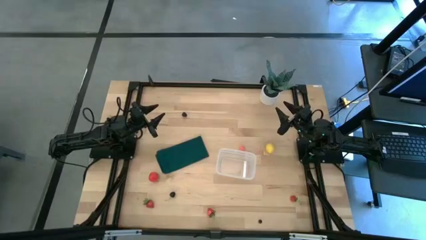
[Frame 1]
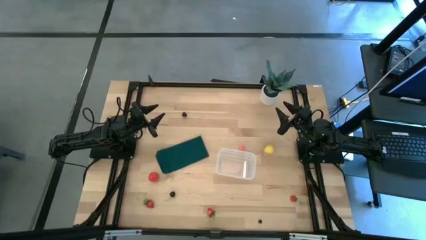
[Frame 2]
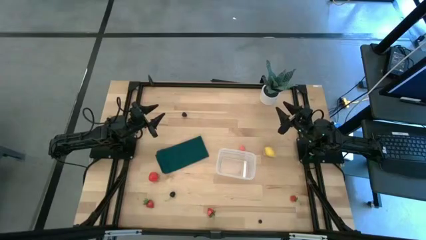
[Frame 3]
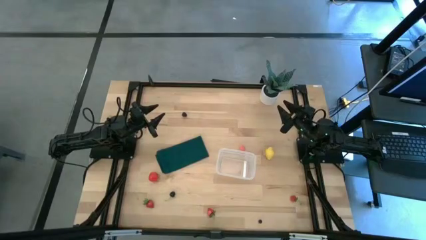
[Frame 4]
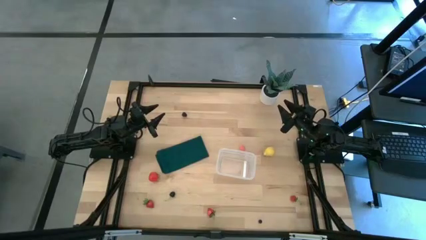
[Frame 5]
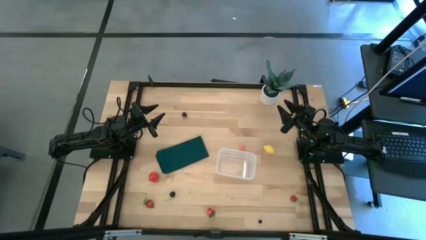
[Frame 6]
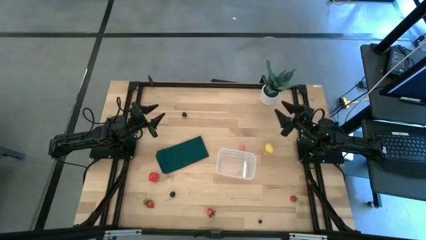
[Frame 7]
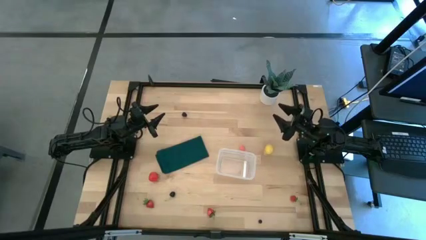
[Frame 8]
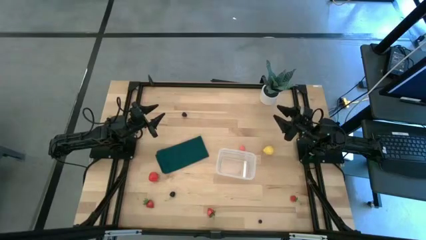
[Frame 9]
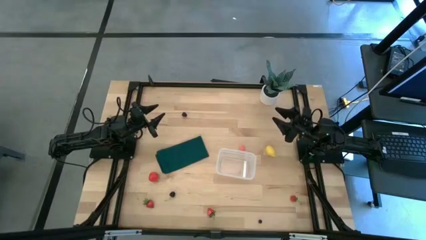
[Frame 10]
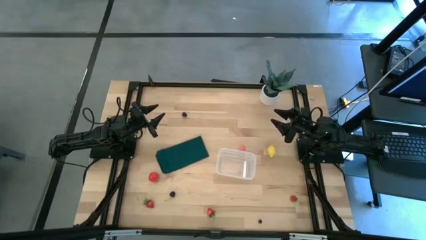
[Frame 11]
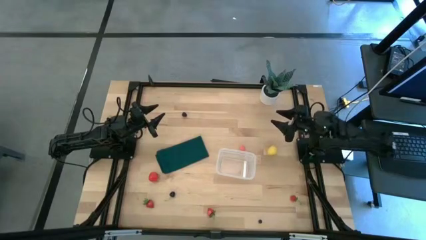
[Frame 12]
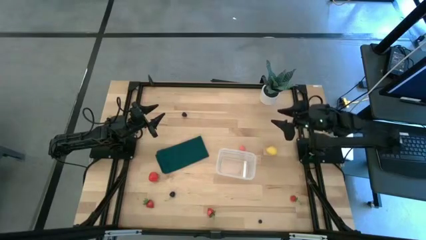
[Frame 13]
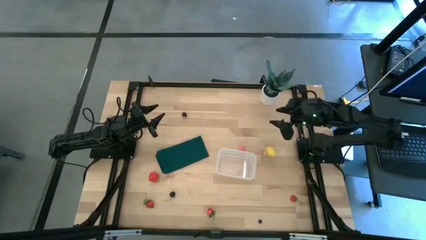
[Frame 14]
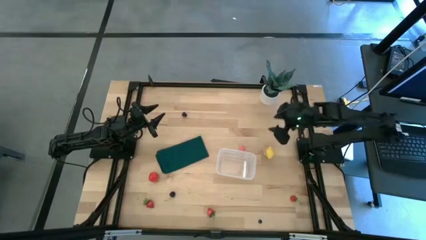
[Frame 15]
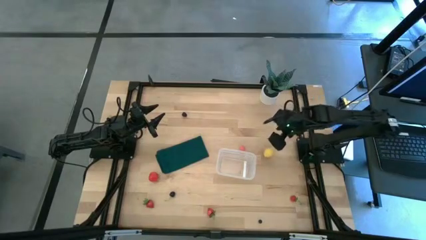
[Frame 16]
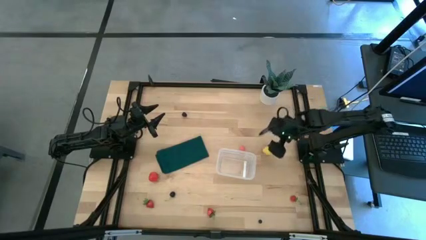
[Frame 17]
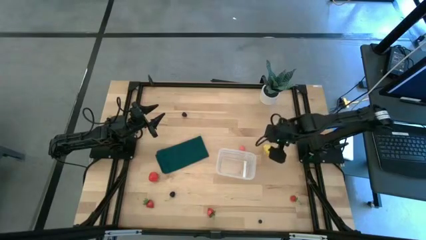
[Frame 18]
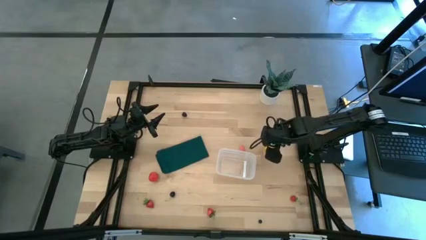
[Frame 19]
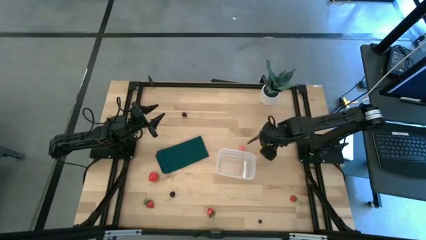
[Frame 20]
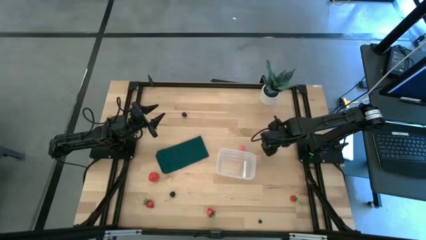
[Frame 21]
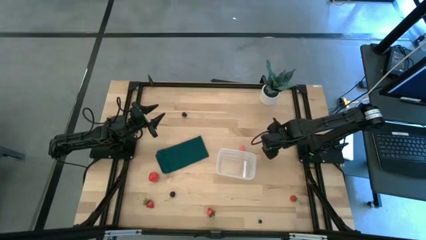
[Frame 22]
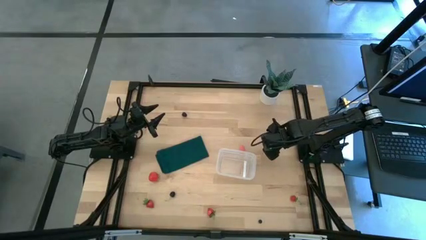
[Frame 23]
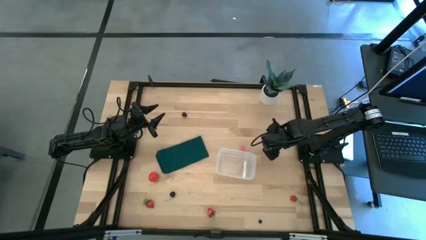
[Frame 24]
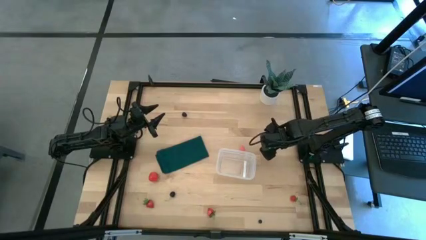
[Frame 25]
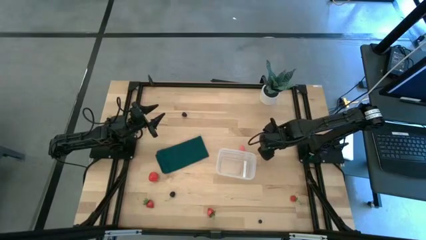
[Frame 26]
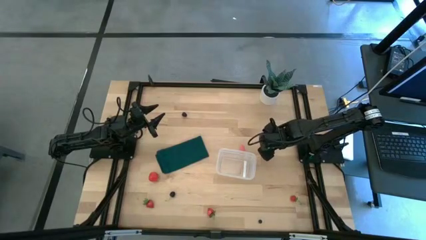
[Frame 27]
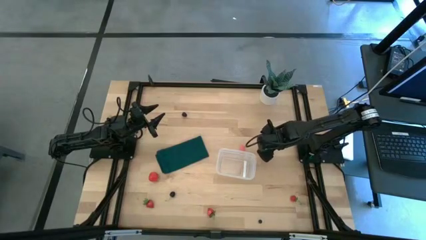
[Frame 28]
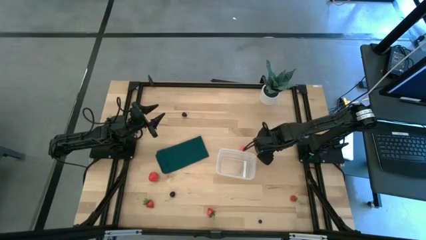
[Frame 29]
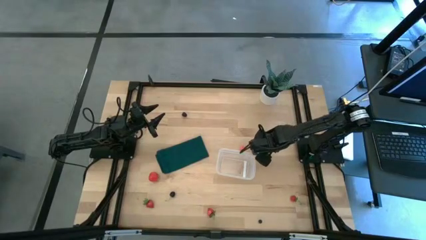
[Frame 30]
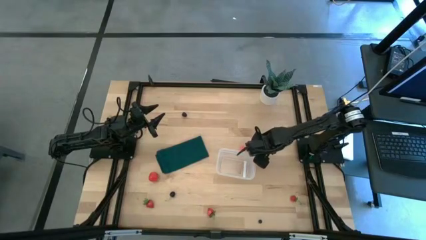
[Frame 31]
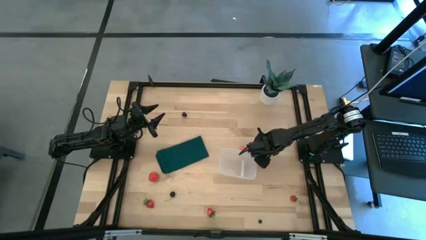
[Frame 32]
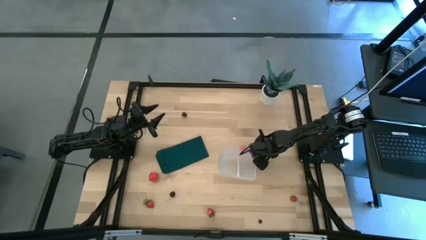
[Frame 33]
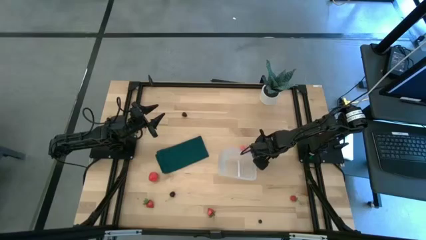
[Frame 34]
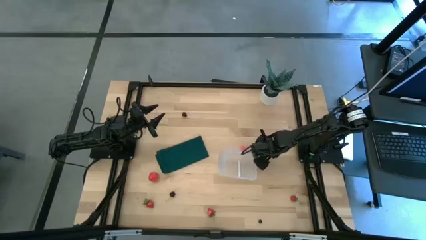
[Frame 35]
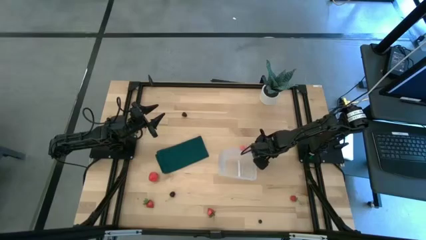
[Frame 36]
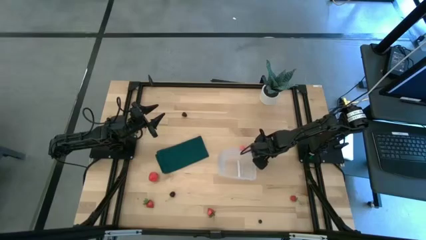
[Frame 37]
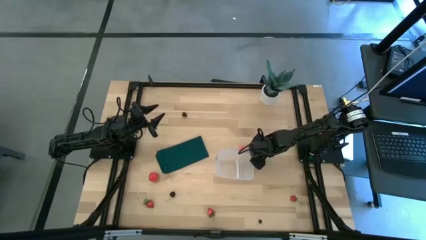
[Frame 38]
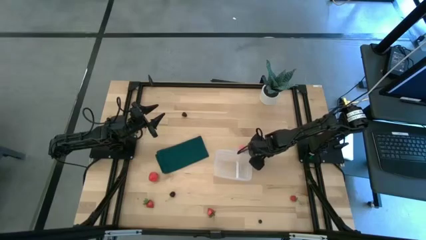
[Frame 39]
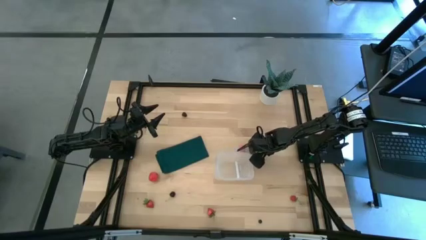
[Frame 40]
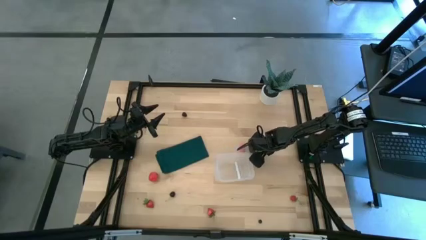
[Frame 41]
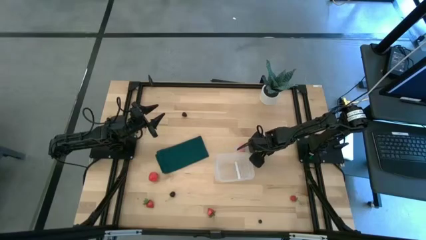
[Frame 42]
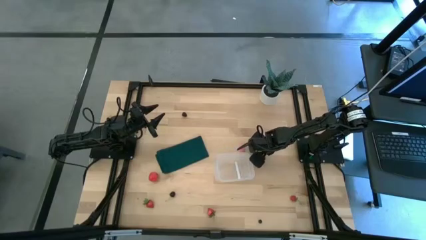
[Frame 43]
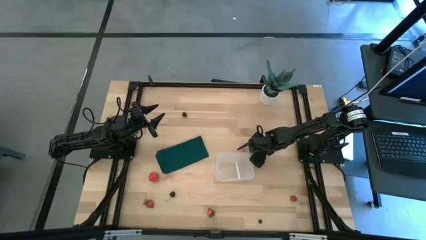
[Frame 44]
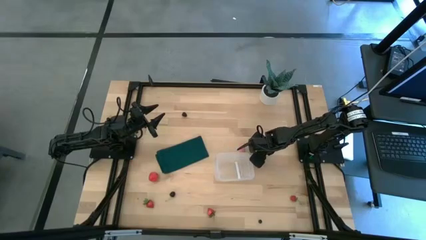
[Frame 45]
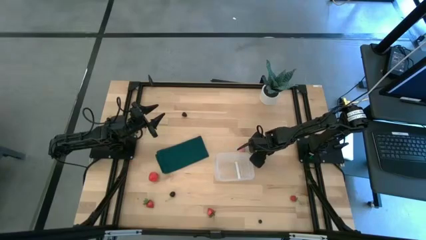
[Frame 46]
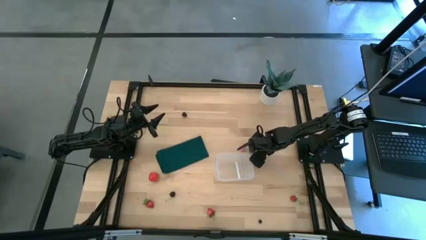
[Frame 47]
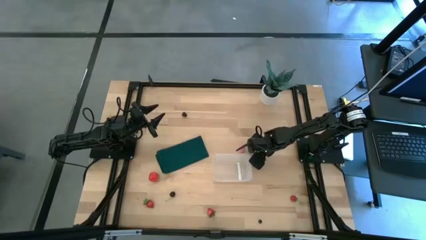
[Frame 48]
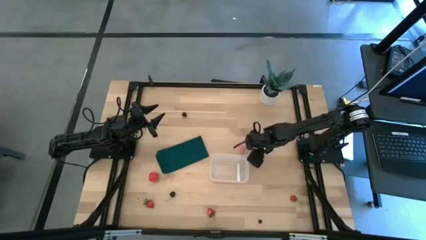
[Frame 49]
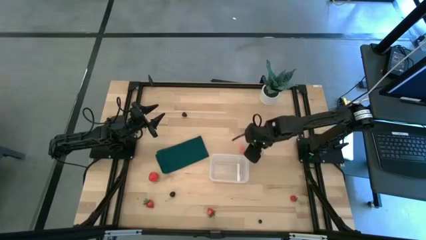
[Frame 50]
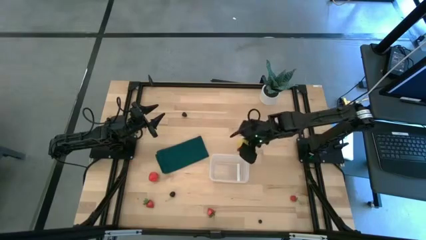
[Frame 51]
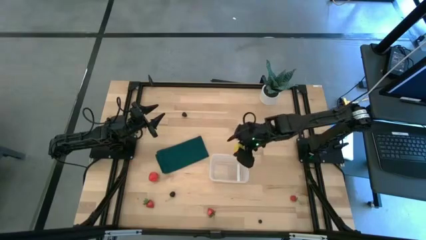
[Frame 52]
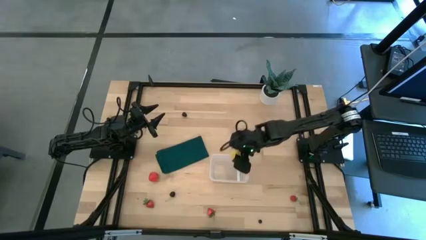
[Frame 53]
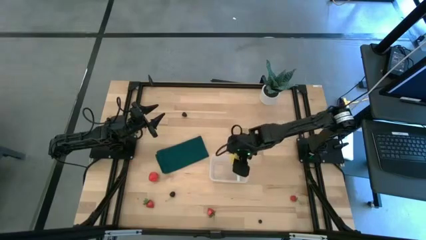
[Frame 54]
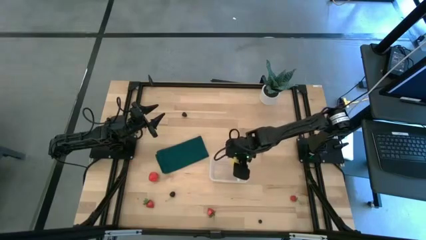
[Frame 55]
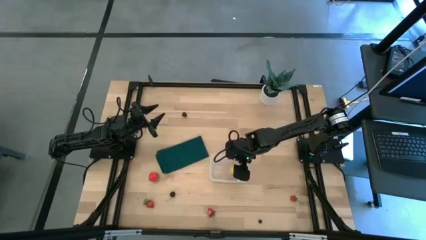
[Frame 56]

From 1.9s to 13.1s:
Task: Pick and placing Produce into tupperware
Put the lemon into the transparent bin

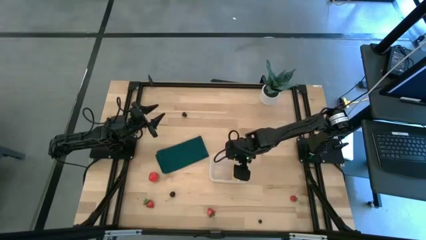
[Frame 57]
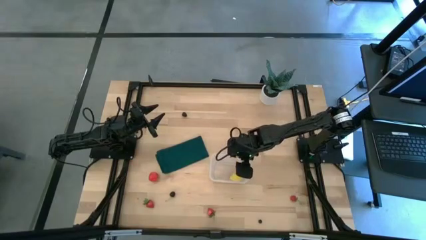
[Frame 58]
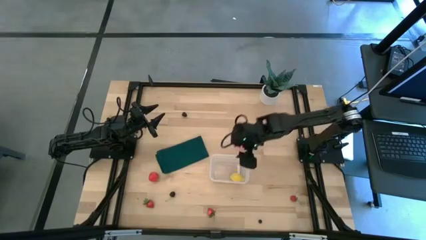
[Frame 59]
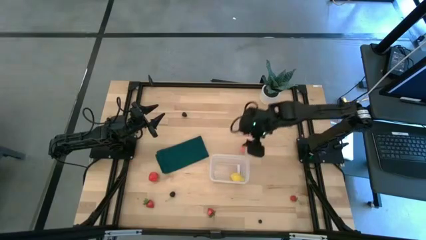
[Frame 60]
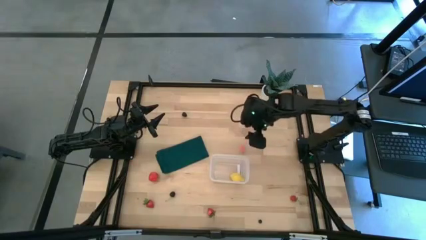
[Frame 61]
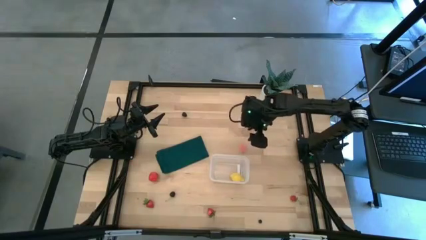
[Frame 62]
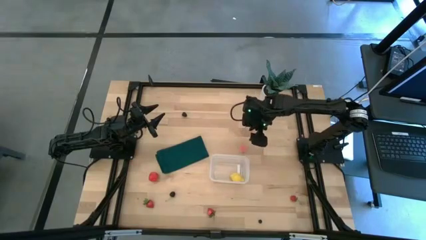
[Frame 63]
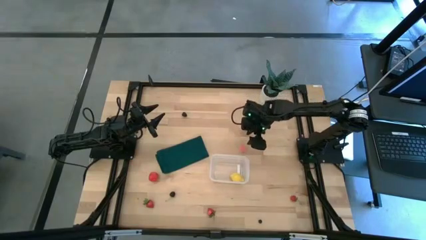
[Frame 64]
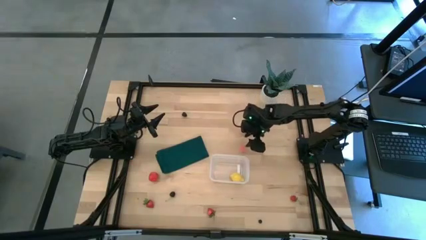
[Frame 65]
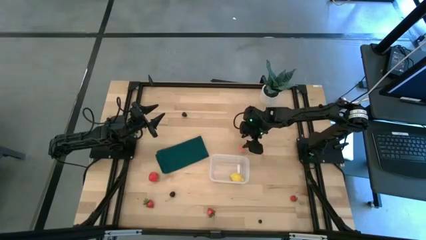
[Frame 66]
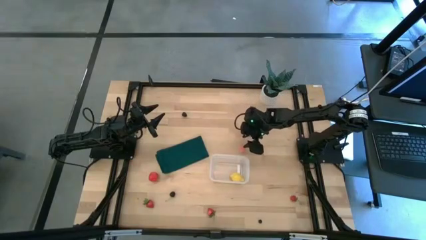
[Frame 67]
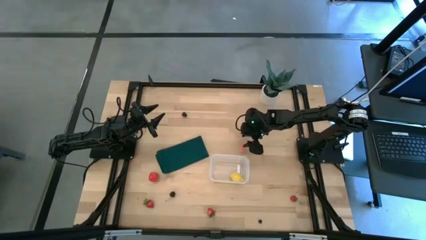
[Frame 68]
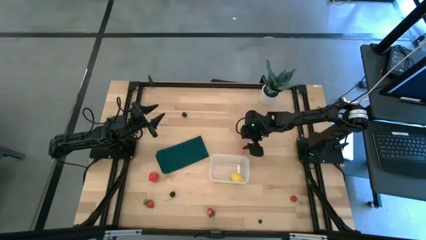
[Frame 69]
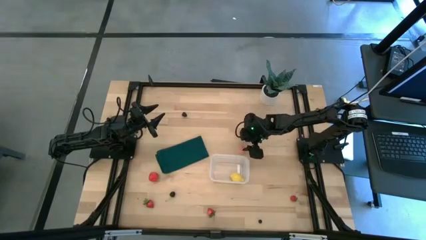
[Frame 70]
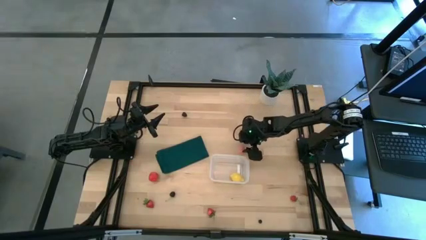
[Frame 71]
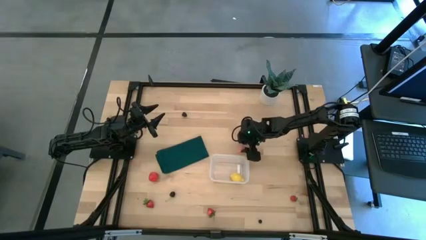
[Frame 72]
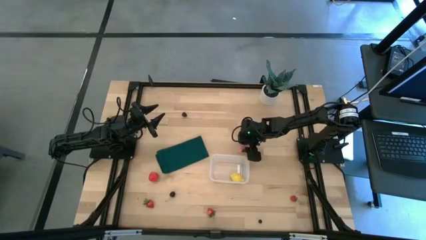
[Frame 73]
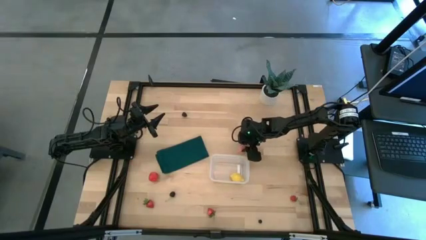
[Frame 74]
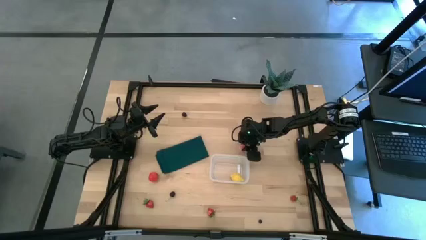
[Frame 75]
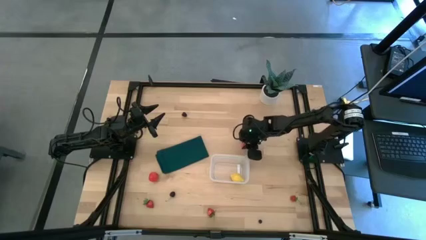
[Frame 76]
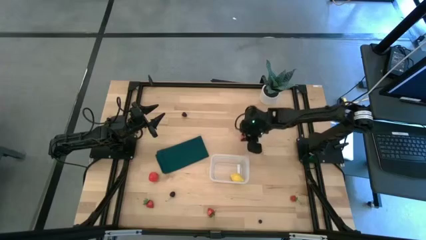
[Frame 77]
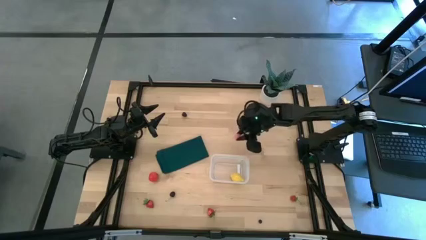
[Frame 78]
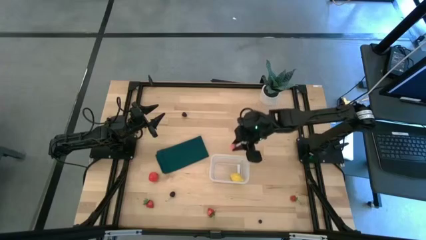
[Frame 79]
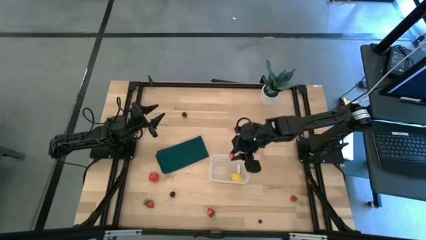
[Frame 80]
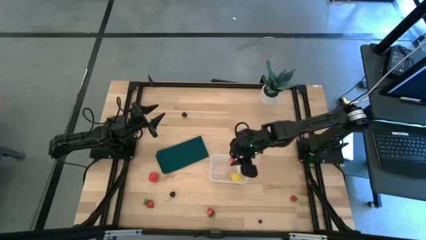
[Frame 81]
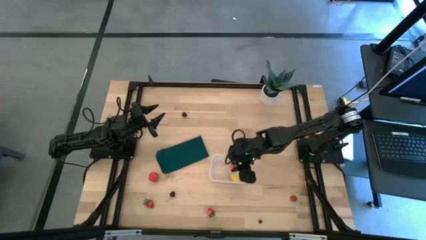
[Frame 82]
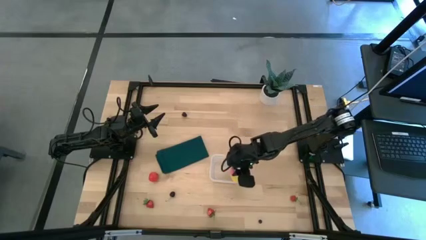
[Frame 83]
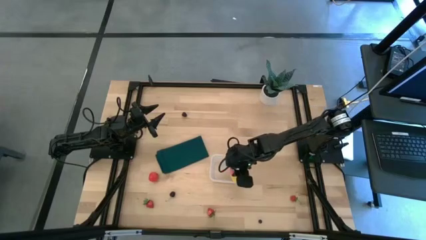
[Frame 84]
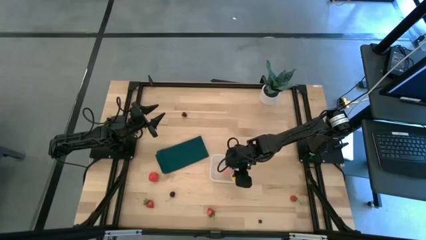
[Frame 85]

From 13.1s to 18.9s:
Put the apricot into the transparent bin
